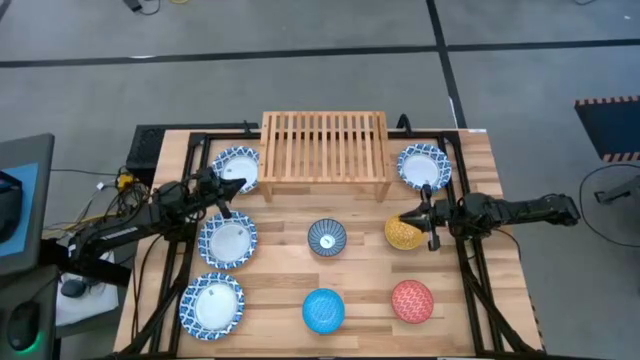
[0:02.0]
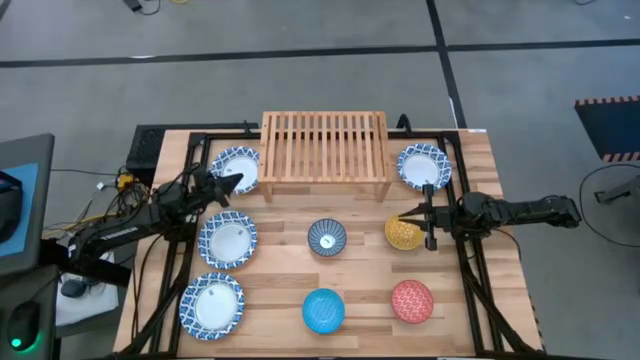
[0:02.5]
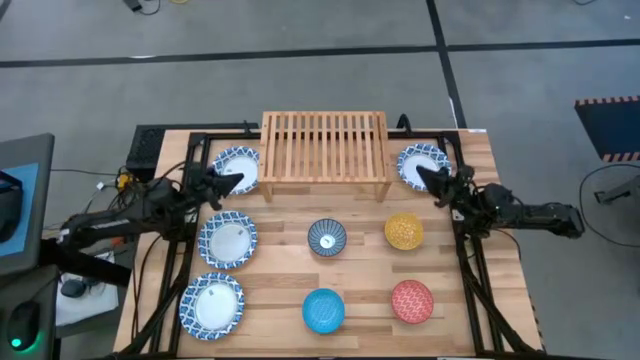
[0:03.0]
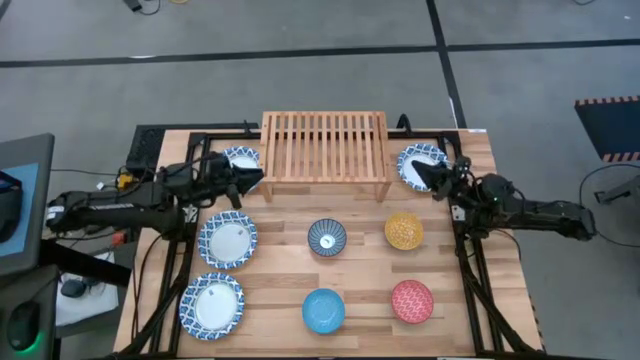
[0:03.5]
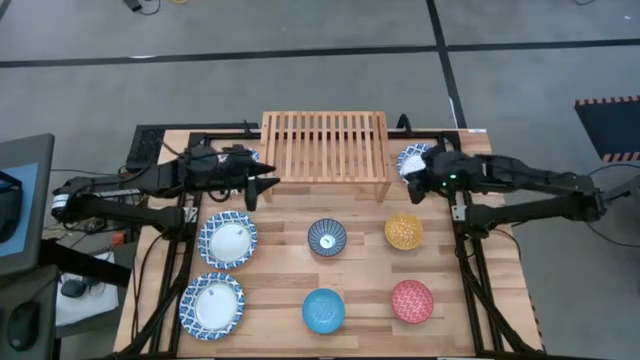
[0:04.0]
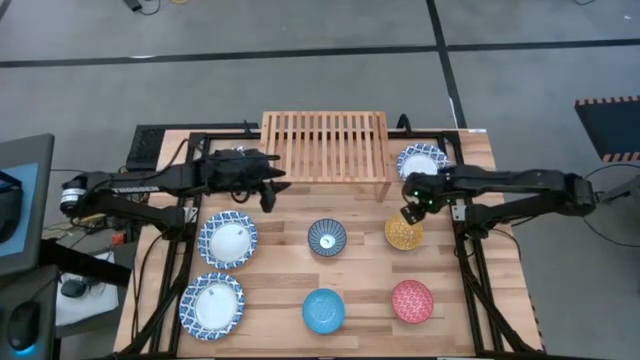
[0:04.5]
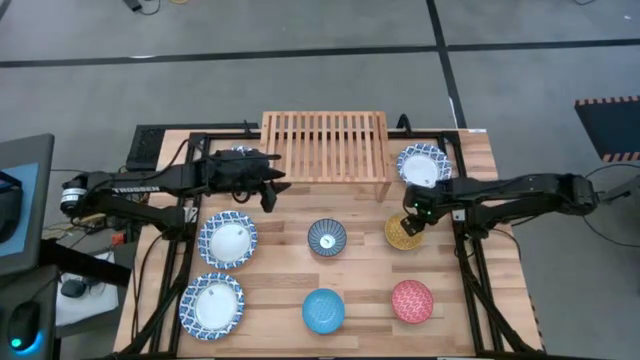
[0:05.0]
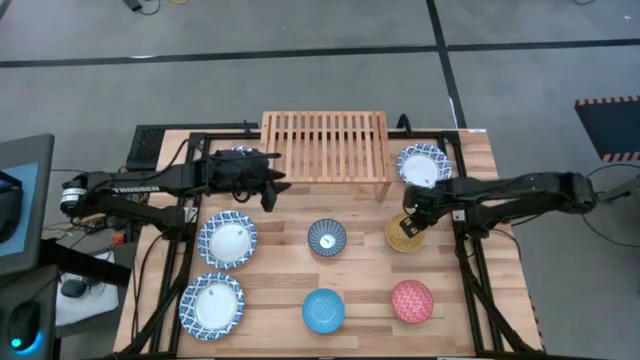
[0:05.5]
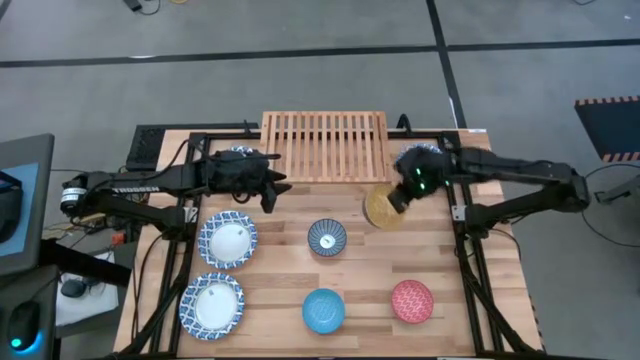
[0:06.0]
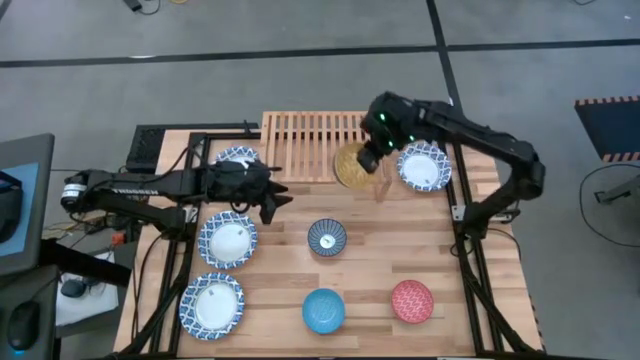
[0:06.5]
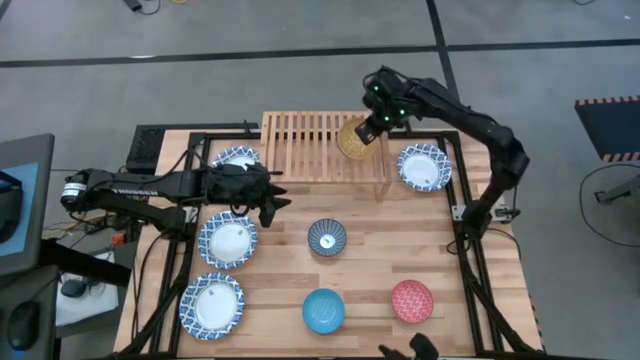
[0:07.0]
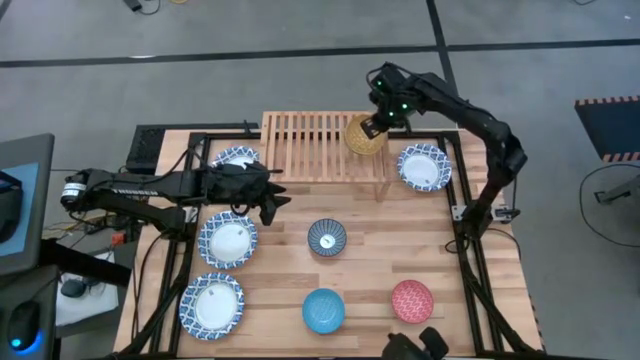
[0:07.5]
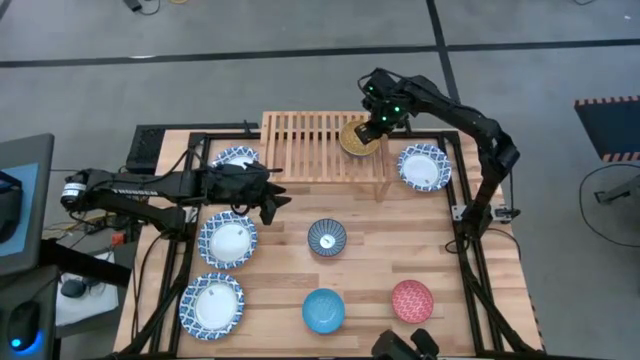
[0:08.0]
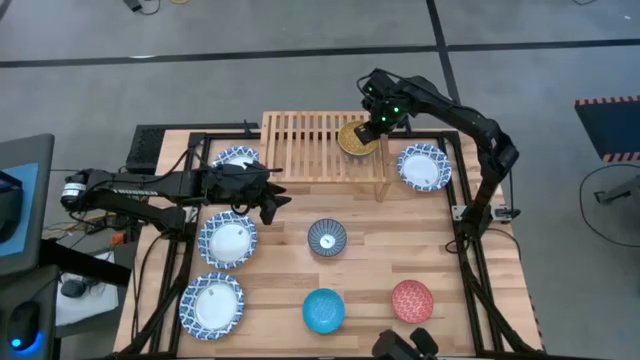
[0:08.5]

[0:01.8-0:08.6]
Task: Place and stack bowls onto a shelf
Put the yellow bowl on the shelf

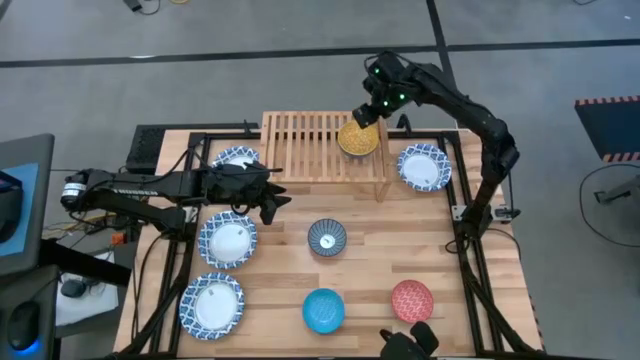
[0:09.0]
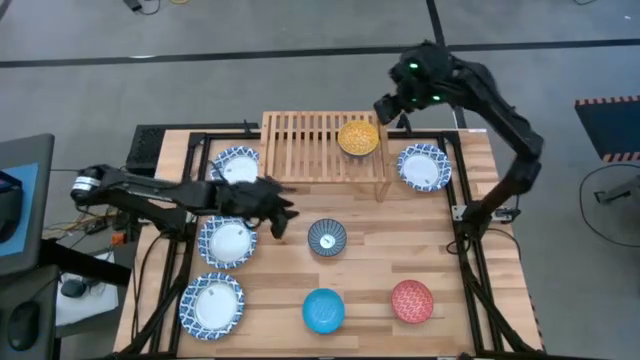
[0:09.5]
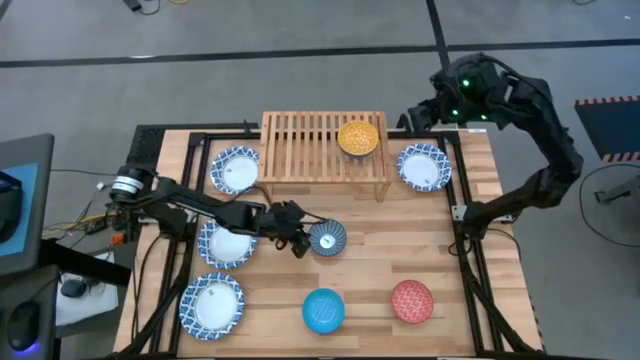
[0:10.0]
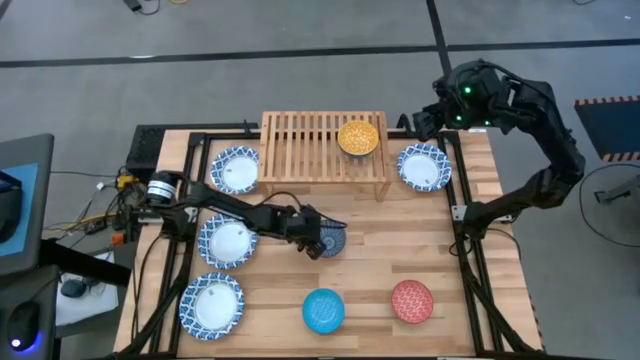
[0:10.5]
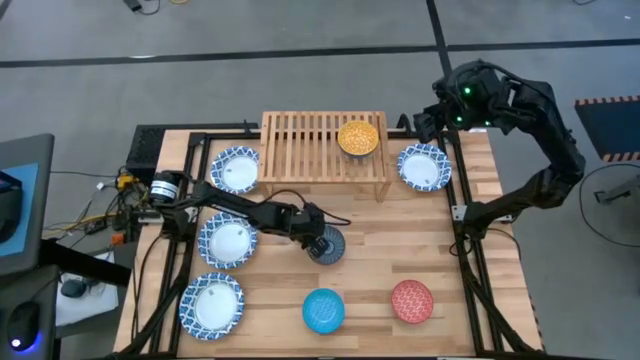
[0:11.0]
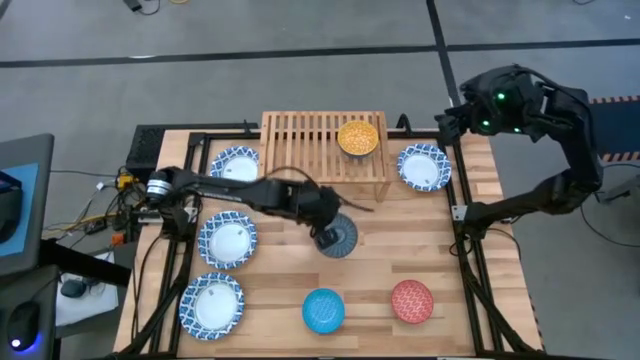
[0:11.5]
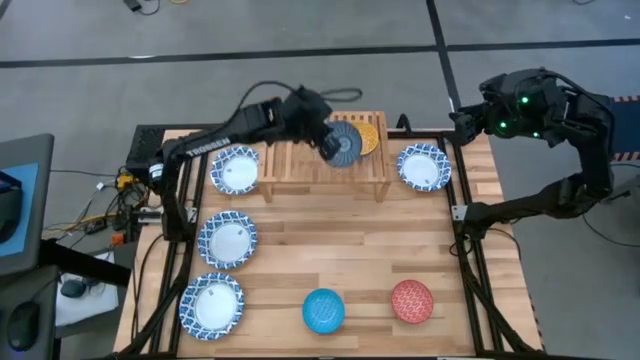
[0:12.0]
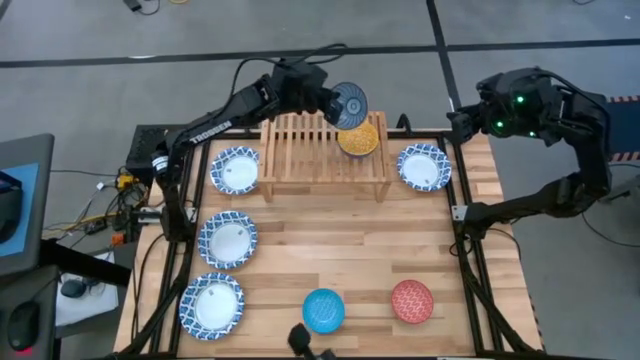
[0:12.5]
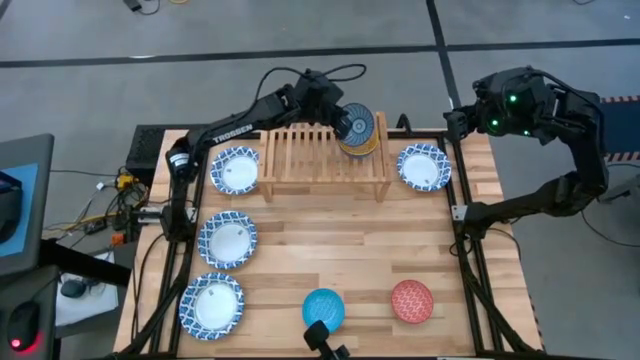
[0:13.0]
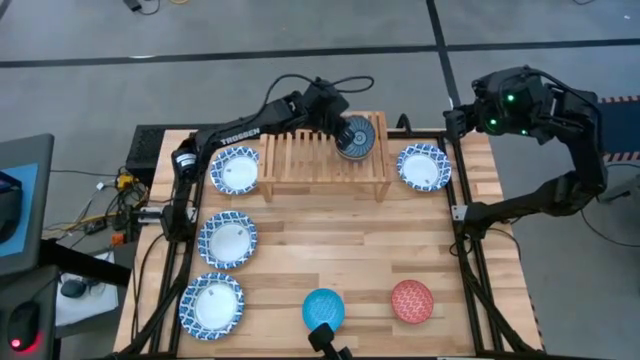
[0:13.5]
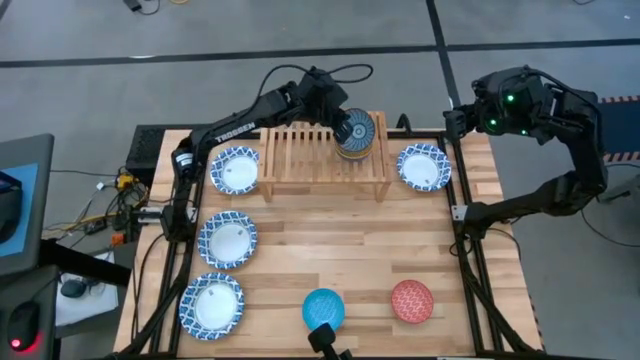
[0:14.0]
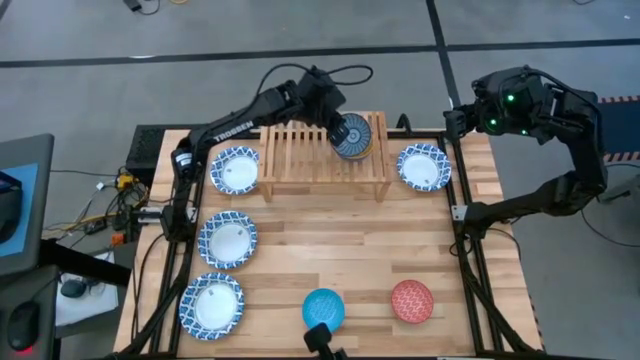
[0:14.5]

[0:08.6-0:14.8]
Stack the blue bowl on top of the yellow bowl

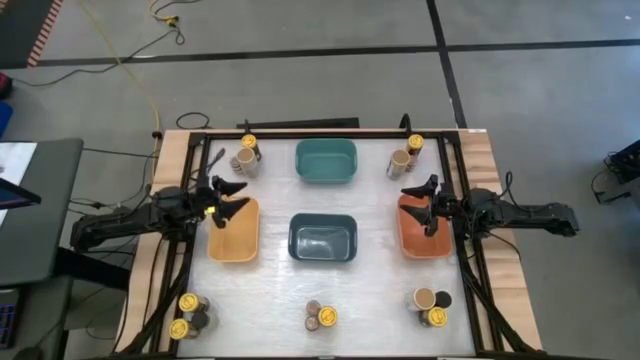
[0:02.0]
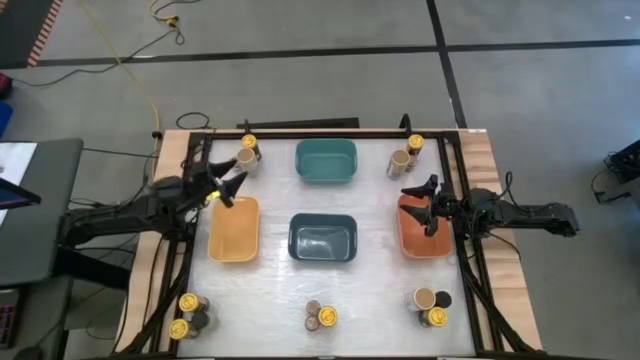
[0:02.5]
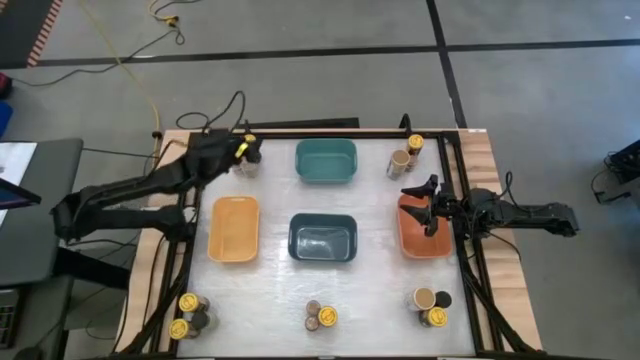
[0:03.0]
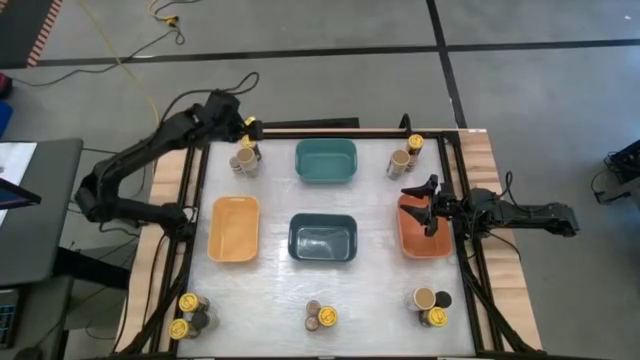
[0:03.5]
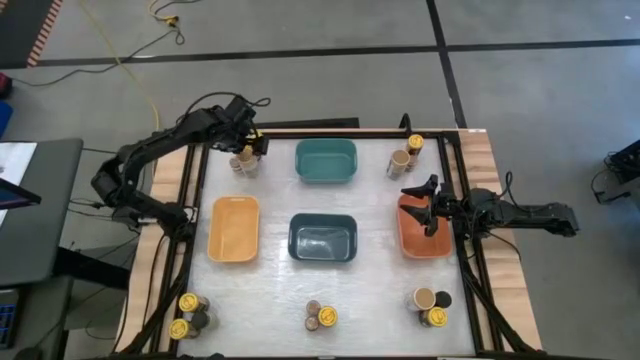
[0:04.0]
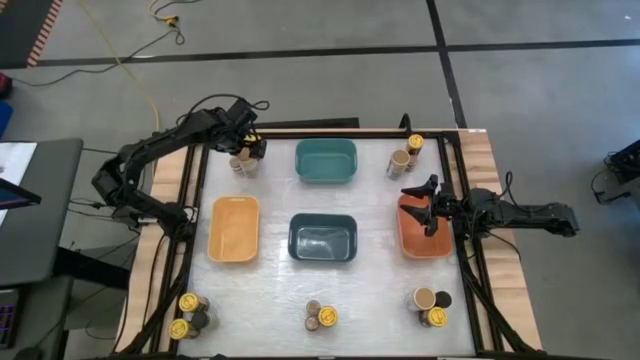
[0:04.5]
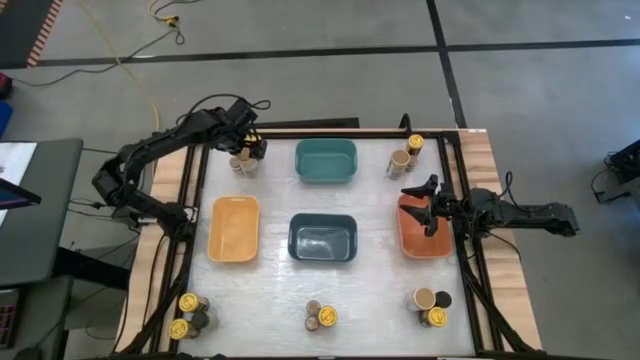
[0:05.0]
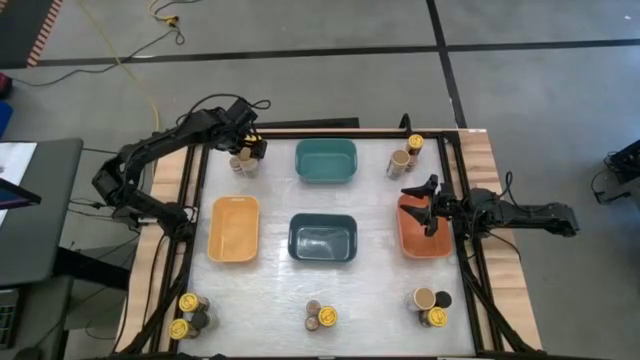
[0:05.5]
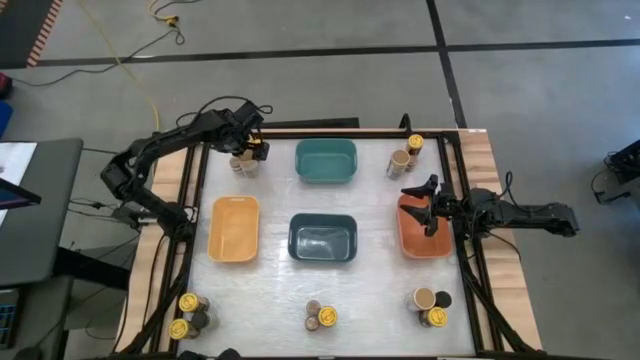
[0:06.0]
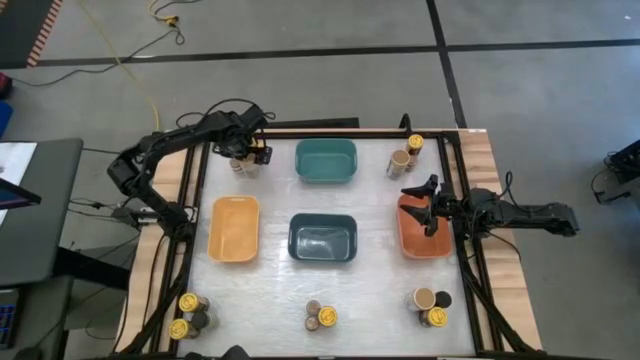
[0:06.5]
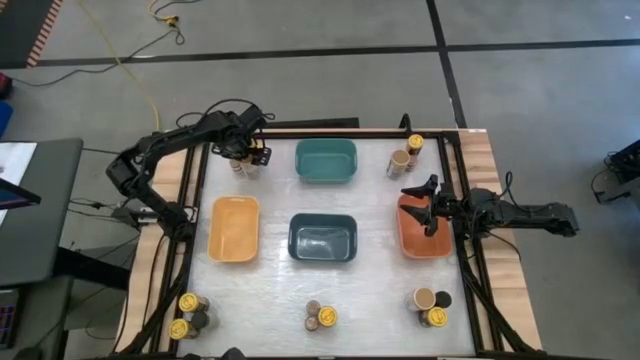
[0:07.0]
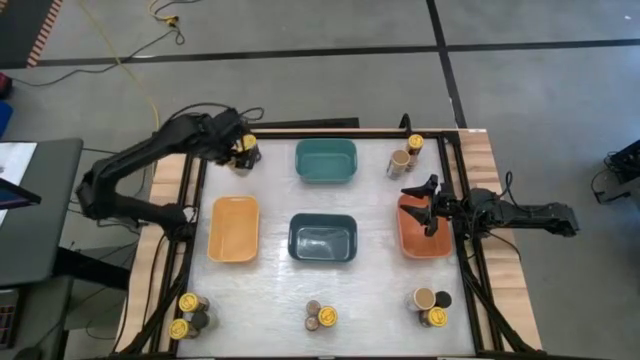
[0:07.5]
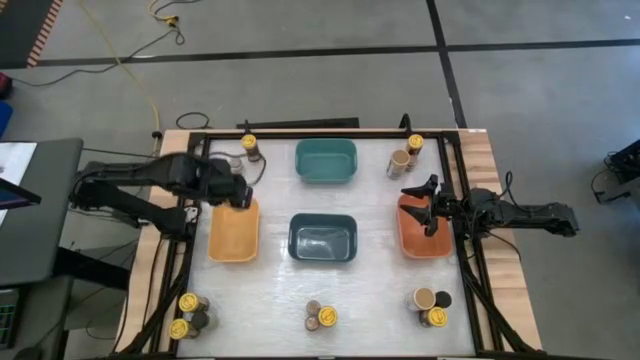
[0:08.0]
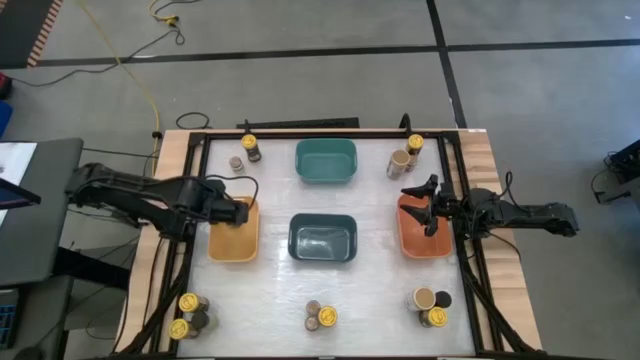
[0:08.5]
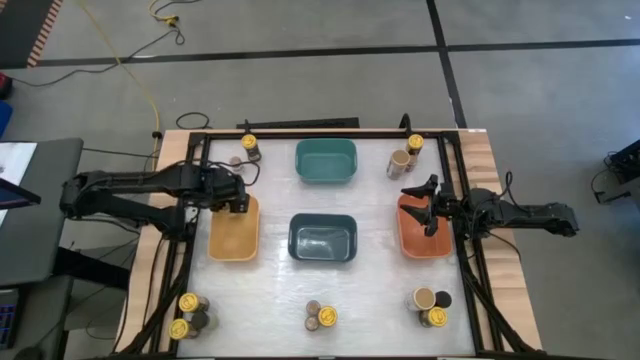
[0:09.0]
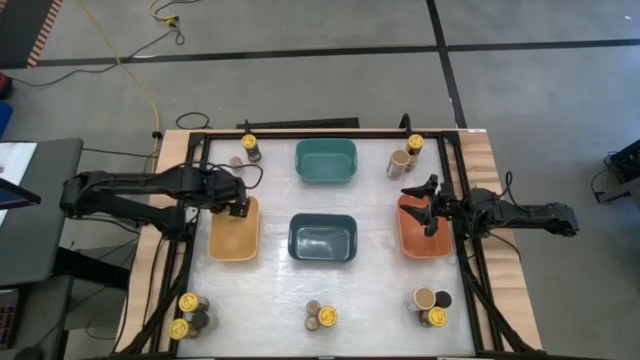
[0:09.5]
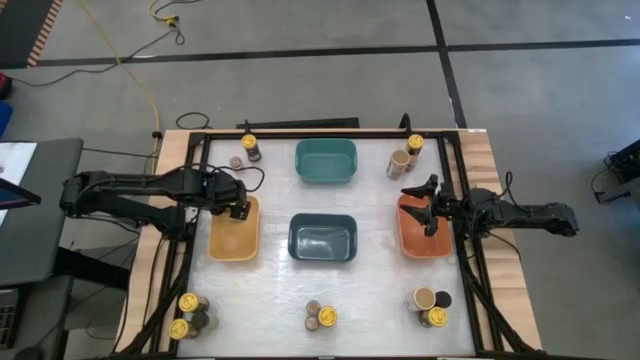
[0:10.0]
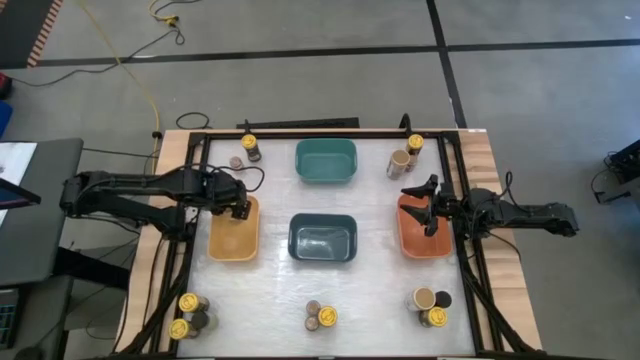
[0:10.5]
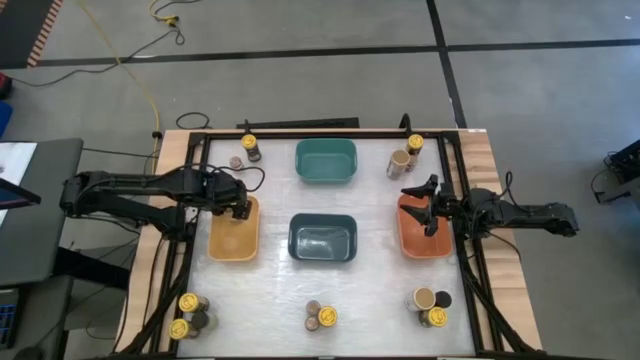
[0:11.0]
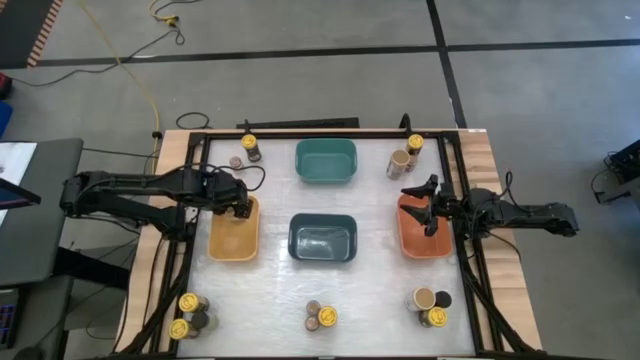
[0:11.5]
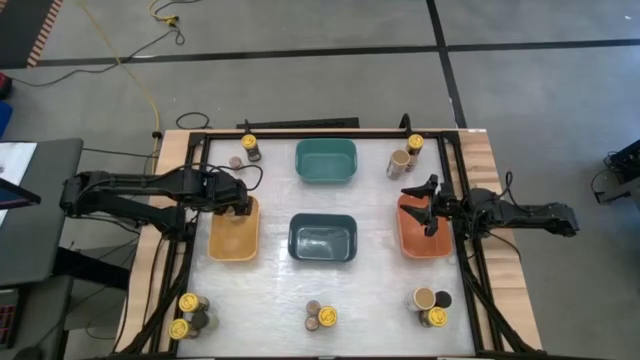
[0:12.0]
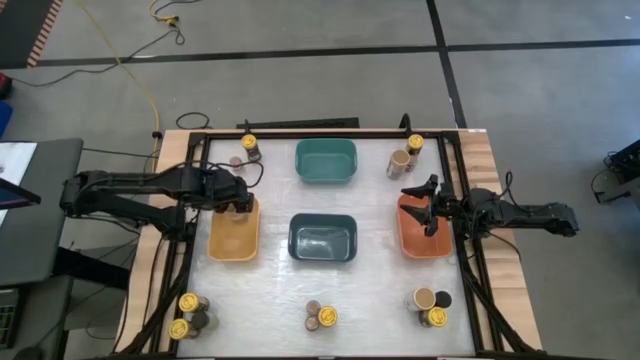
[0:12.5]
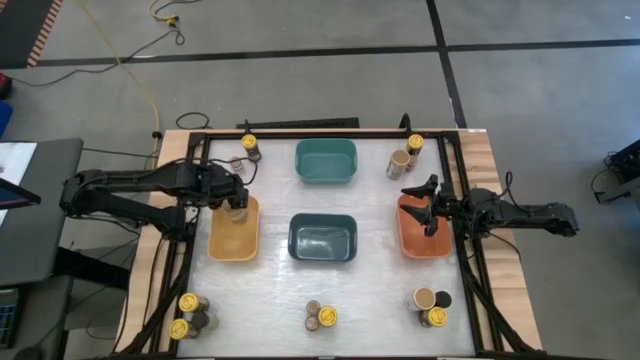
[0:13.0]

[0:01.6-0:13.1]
Task: Sort spices by type
Put the gold seasoning bottle into the yellow bin
